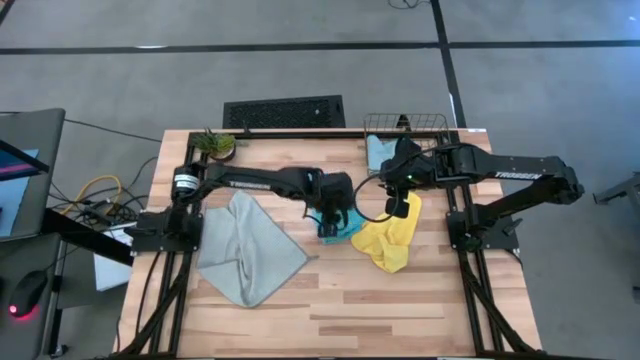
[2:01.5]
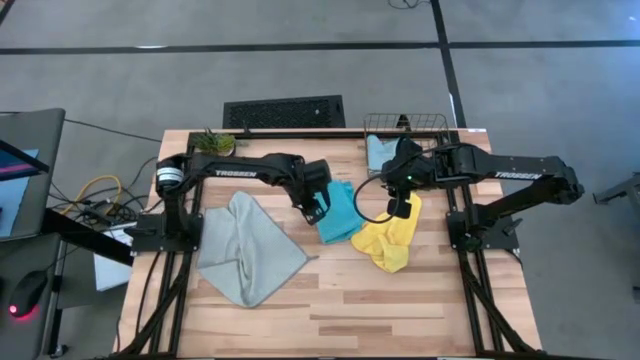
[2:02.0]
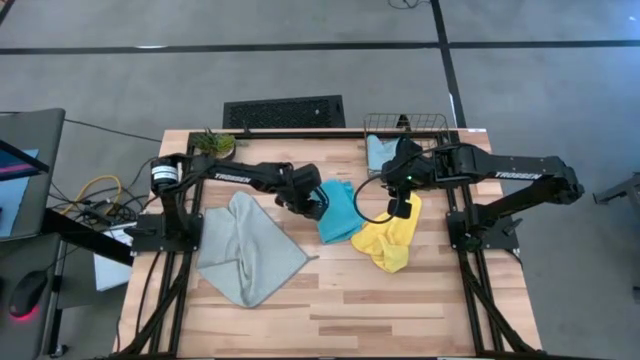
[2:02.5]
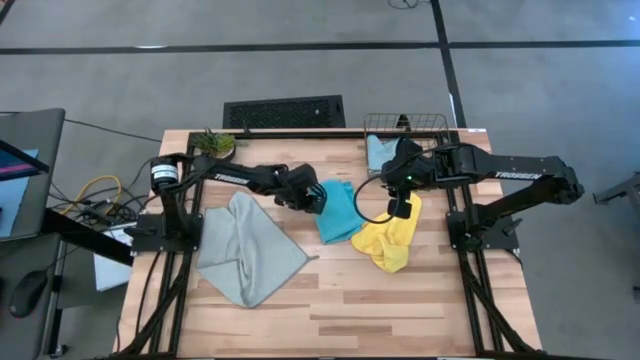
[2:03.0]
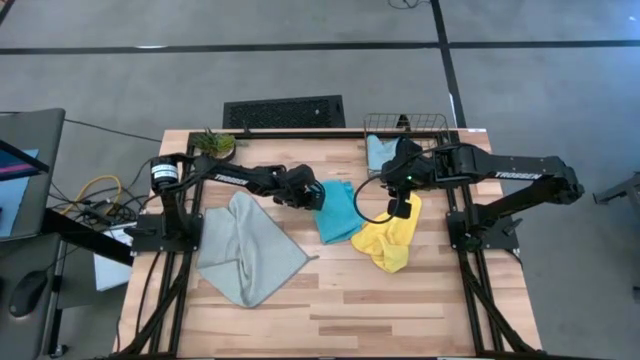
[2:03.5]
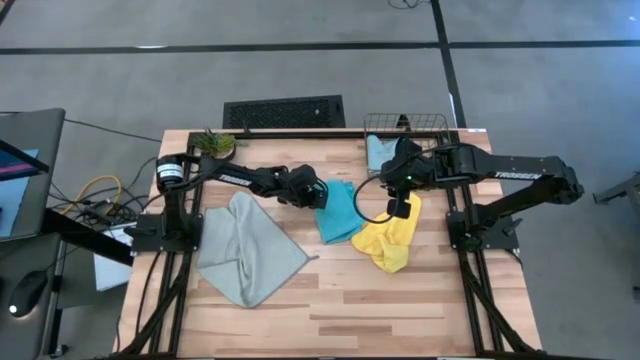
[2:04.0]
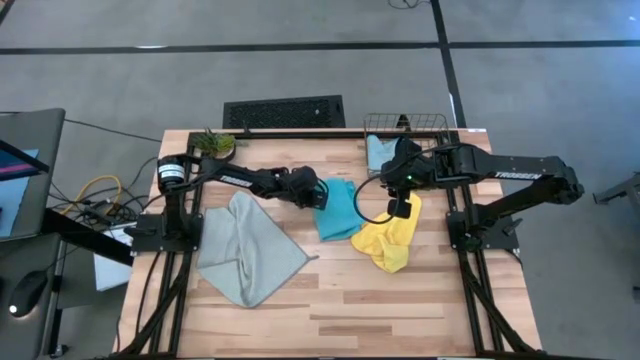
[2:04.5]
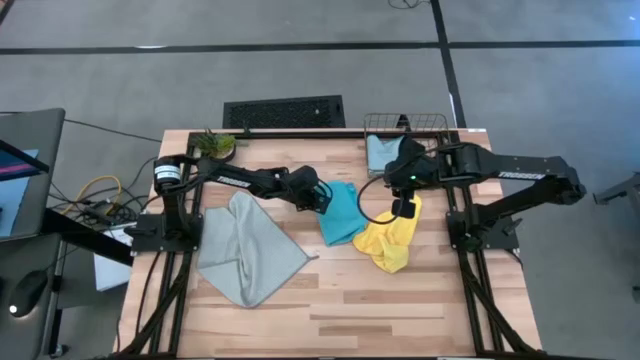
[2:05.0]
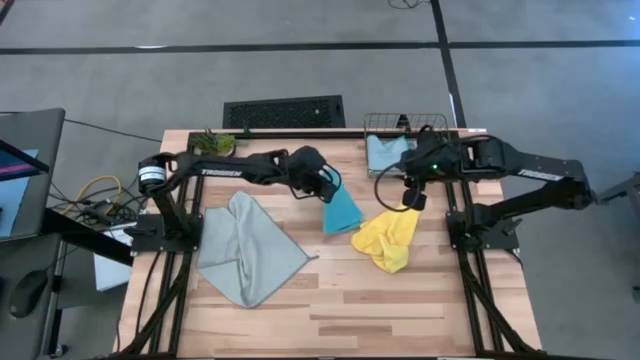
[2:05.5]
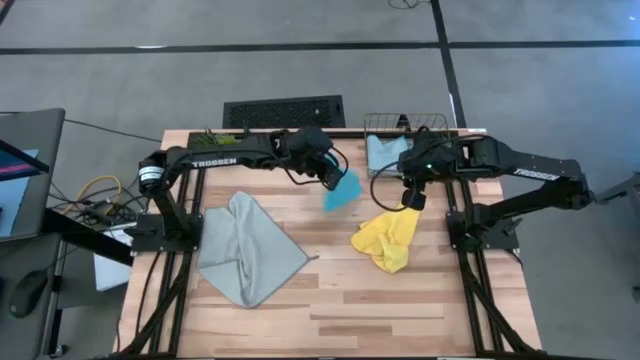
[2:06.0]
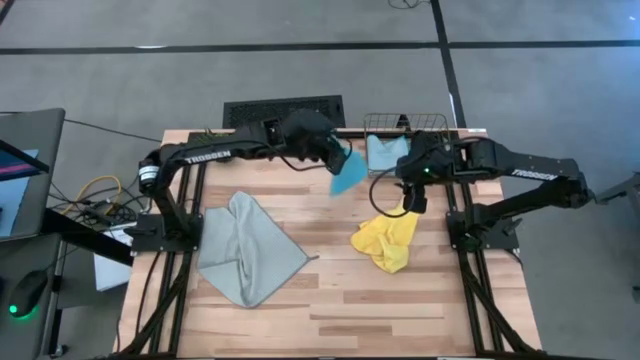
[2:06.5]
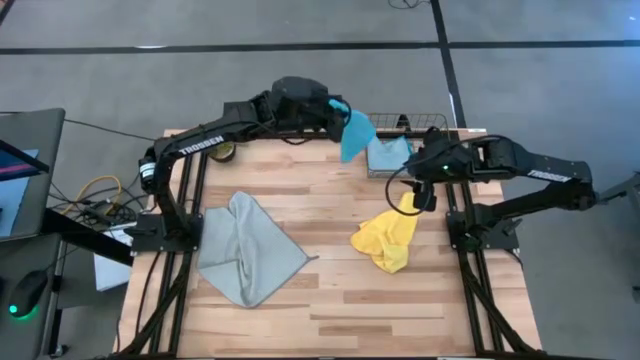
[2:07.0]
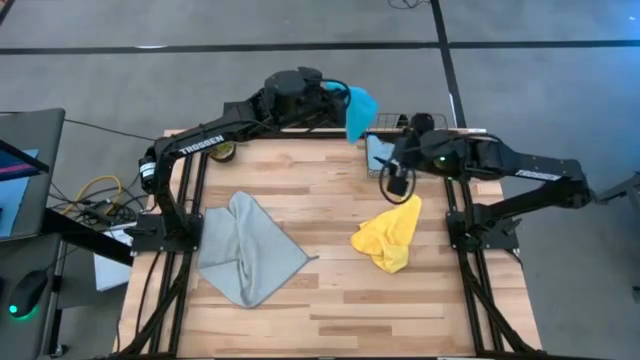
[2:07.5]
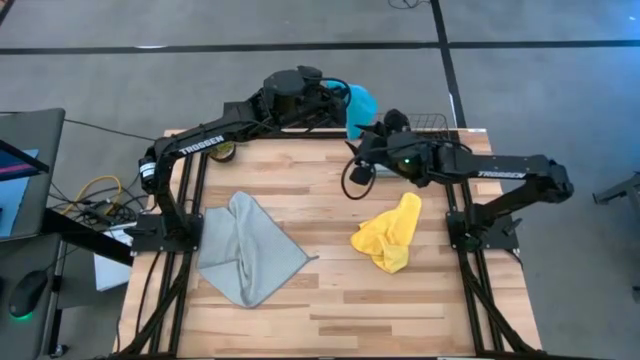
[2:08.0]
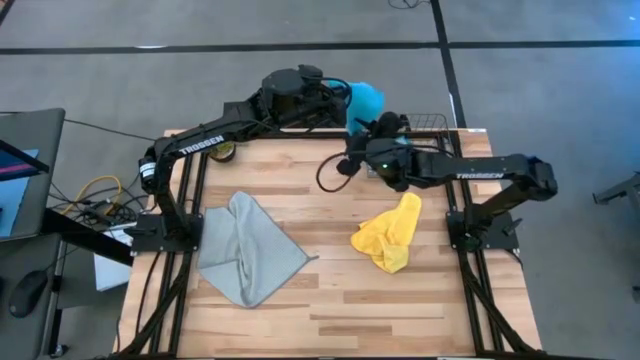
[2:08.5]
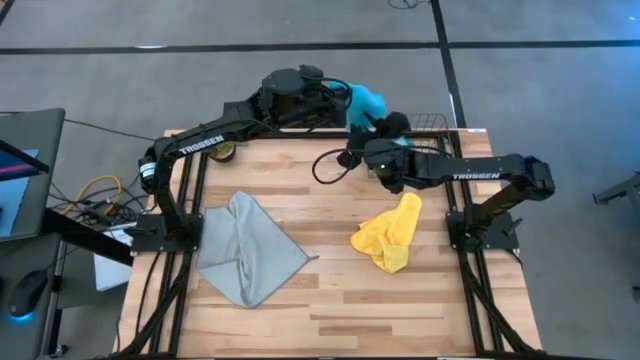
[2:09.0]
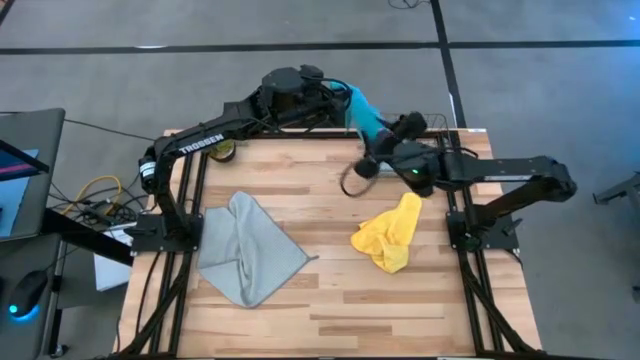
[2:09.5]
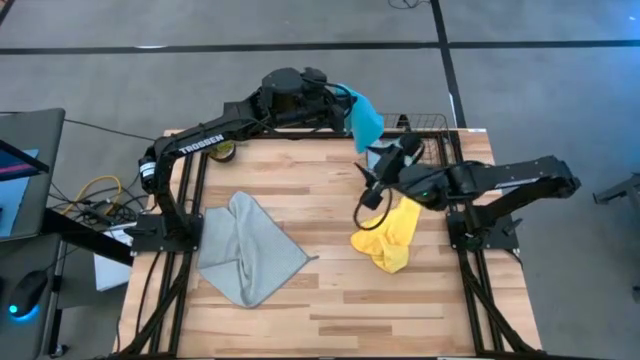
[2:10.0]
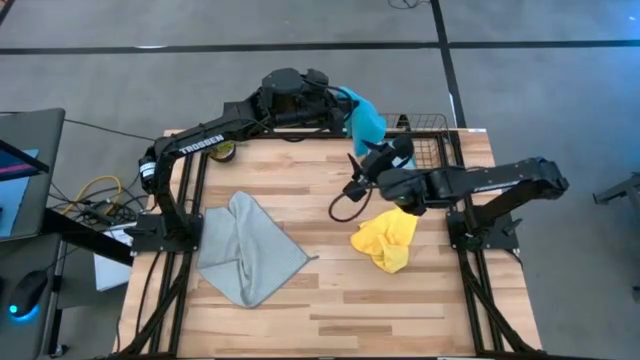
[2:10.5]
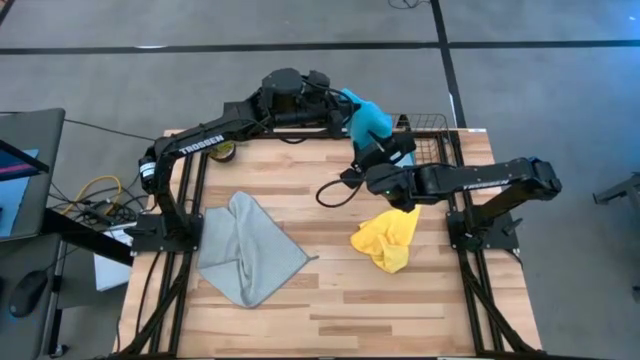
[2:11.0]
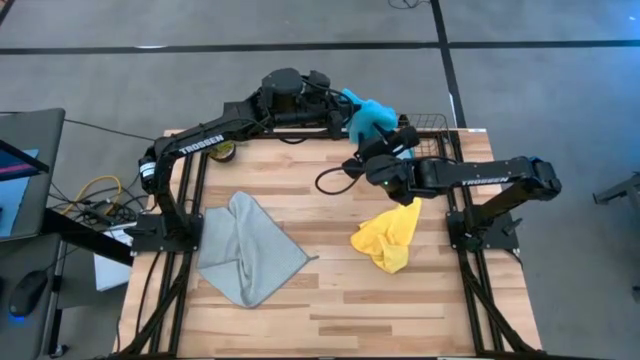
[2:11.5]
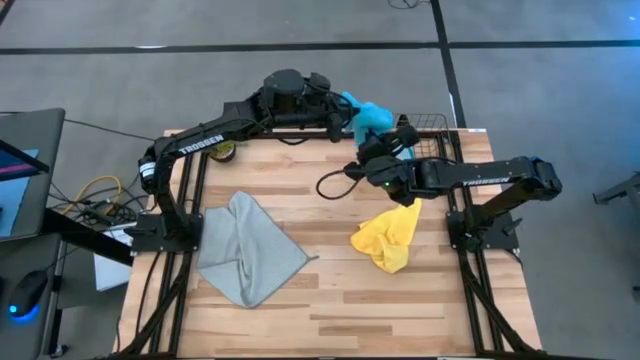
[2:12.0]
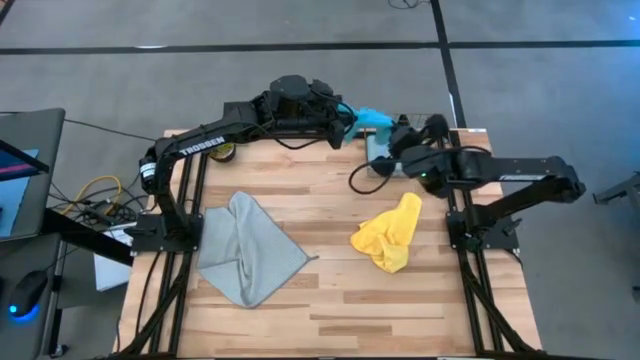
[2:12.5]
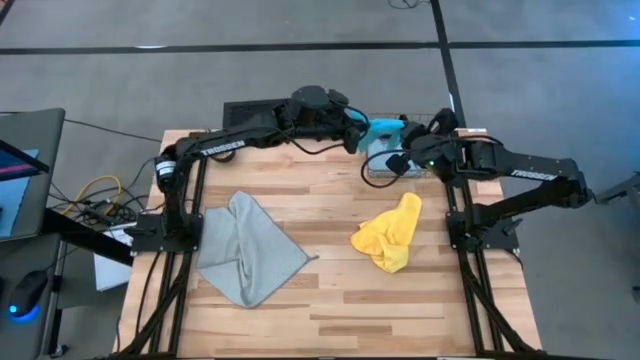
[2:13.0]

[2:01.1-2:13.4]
Task: Fold microfiber towels
Put the folded blue microfiber cloth into the wire basket

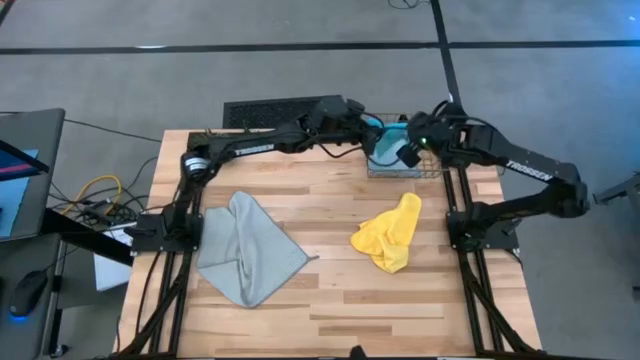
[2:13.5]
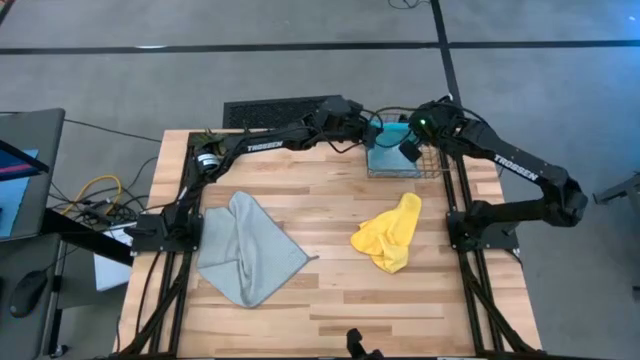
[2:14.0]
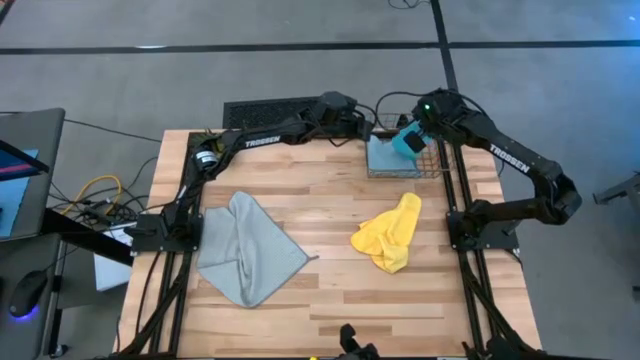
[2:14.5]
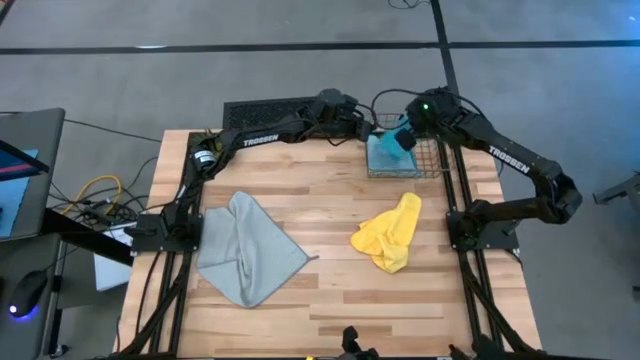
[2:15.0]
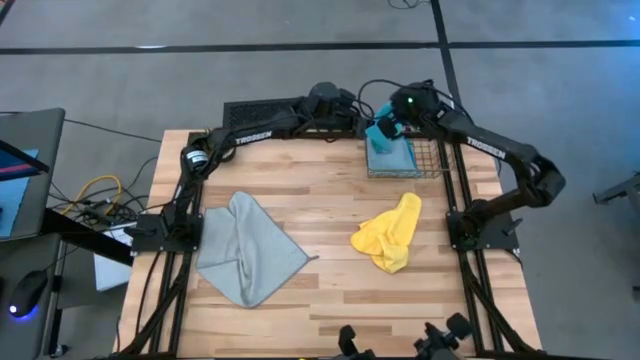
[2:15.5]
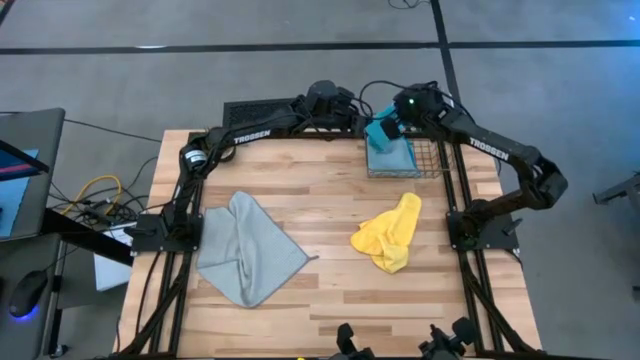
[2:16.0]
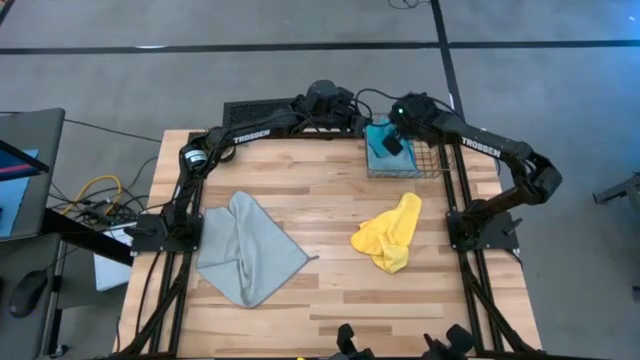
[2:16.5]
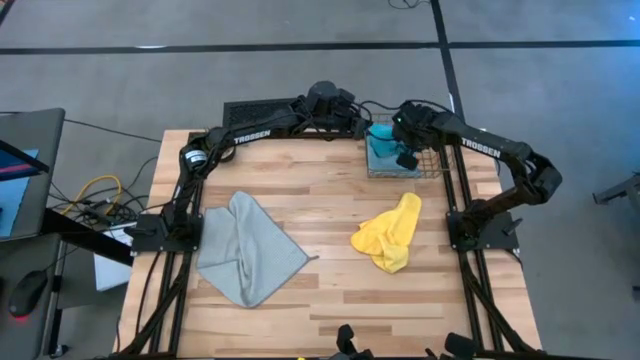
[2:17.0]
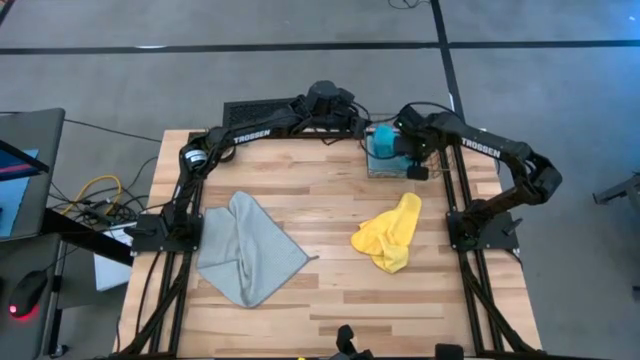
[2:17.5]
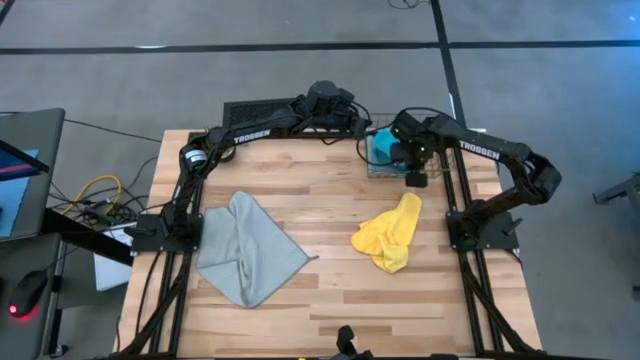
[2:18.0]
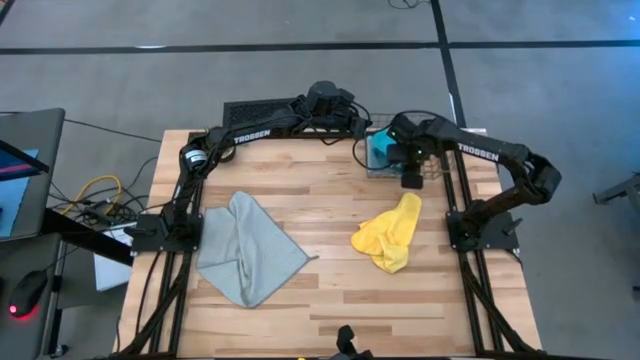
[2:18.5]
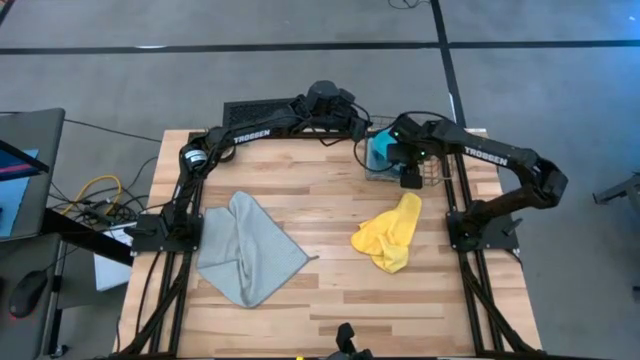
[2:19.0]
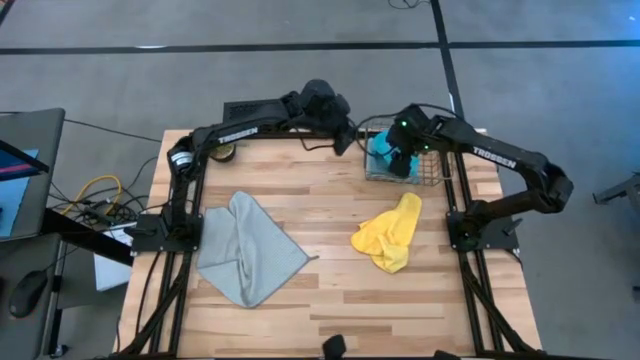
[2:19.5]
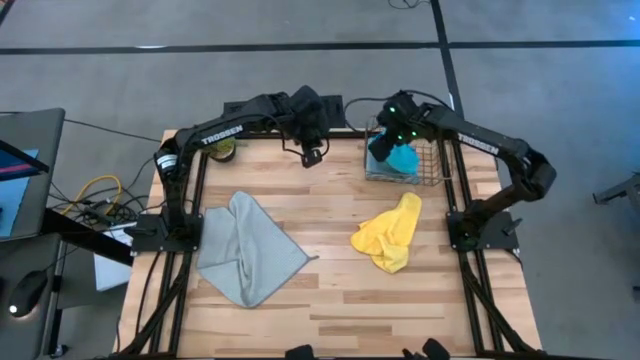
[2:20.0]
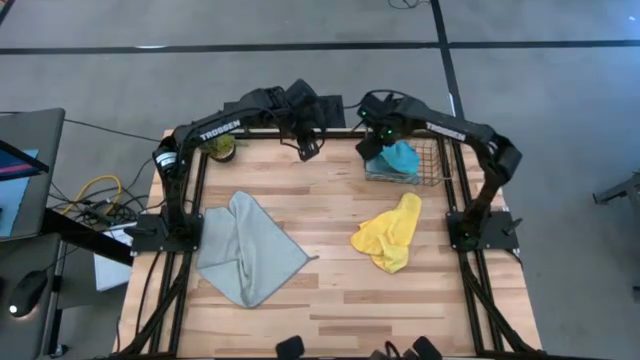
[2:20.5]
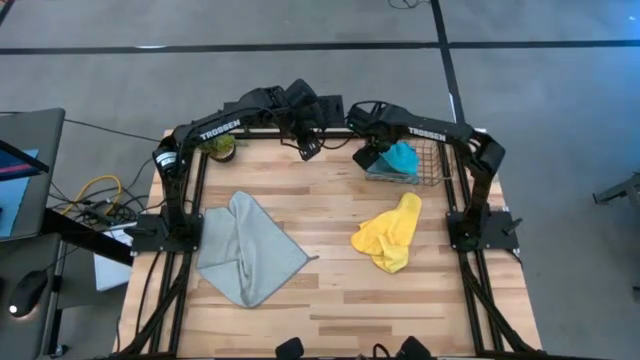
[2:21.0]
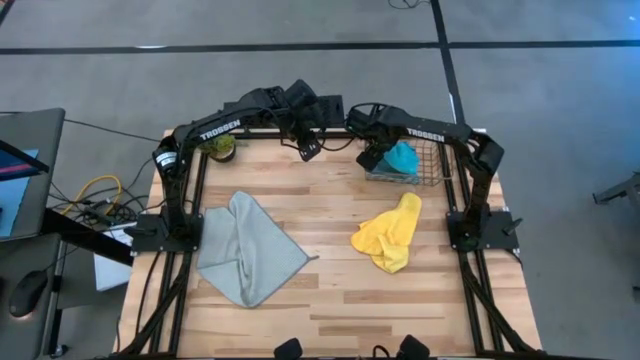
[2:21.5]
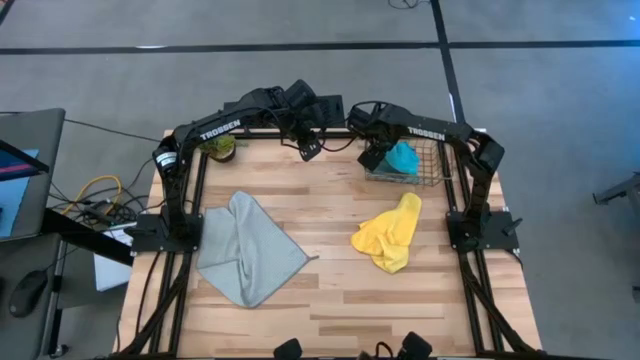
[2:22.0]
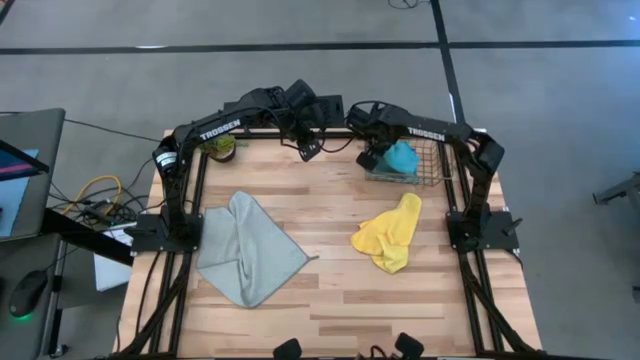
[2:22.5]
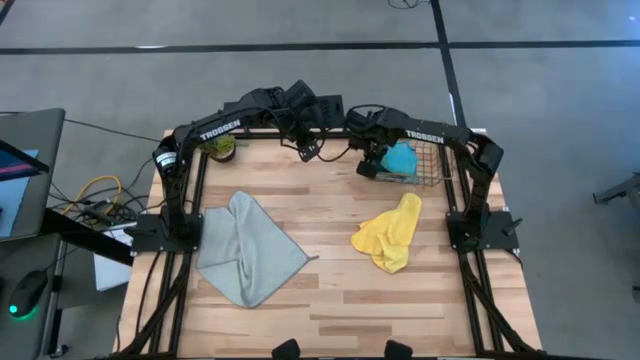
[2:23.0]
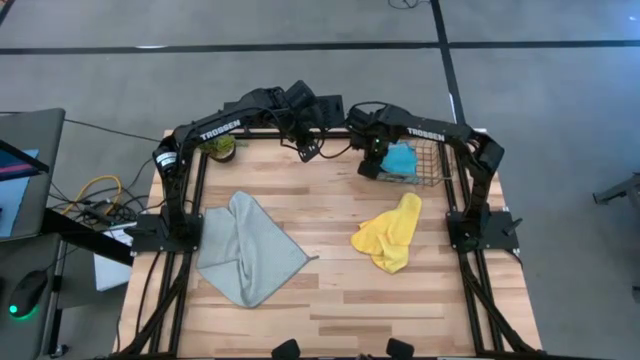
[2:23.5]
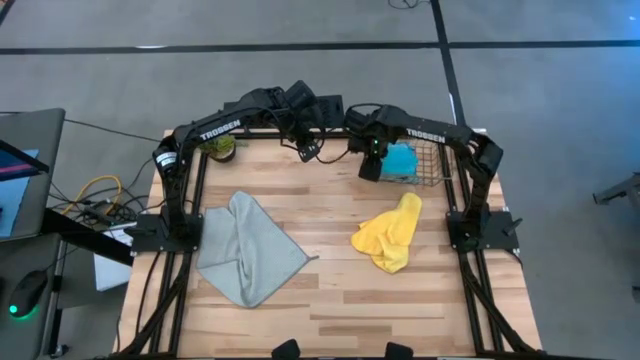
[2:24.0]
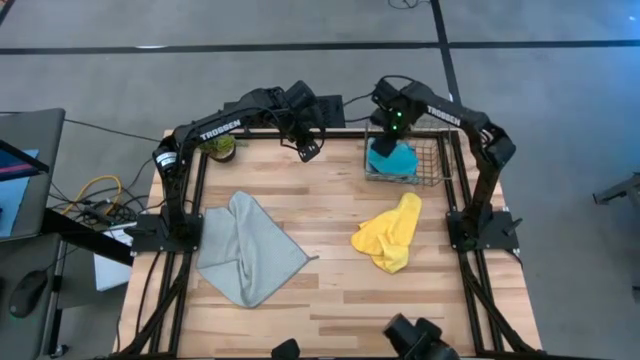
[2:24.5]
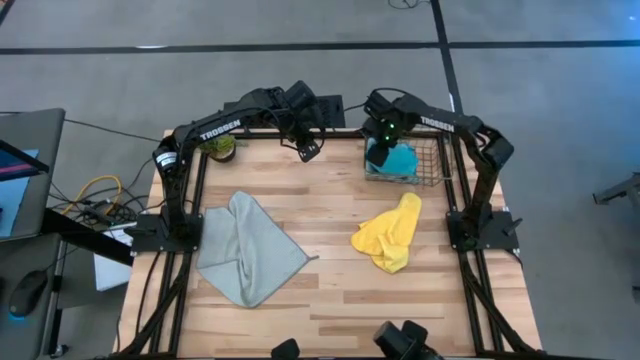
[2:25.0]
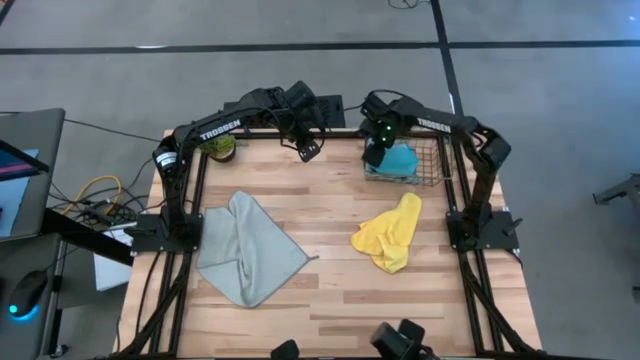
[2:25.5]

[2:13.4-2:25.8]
Put the folded blue microfiber cloth into the wire basket
